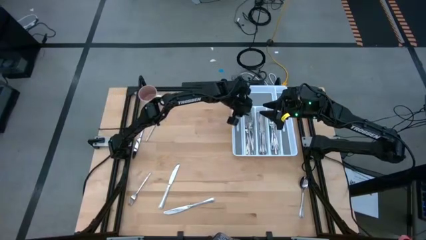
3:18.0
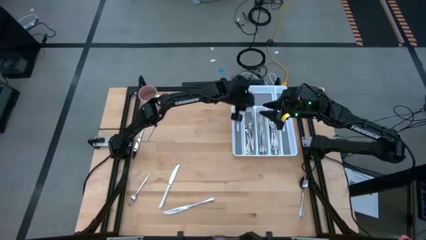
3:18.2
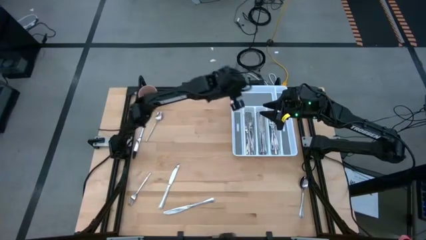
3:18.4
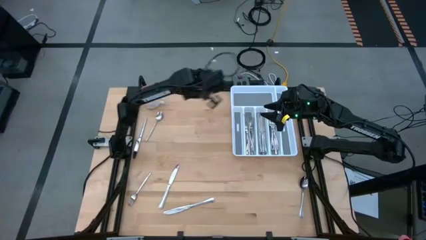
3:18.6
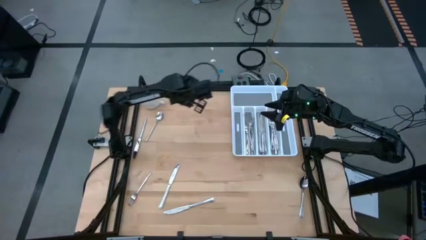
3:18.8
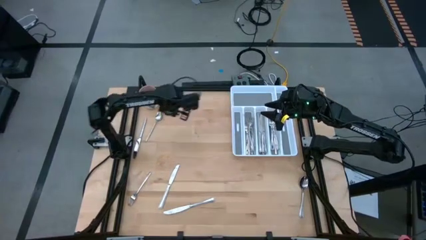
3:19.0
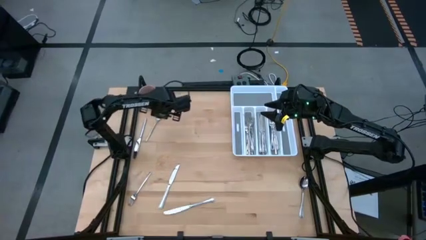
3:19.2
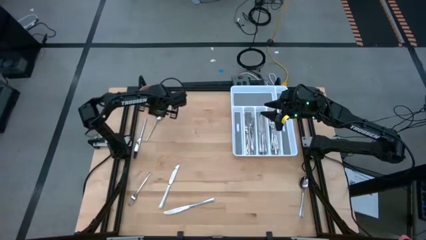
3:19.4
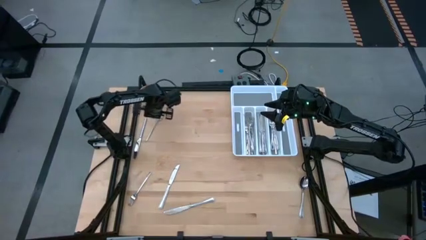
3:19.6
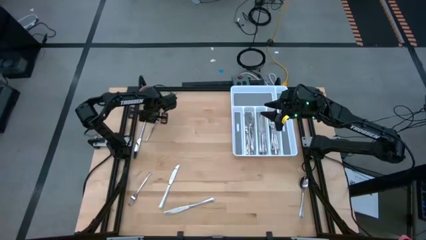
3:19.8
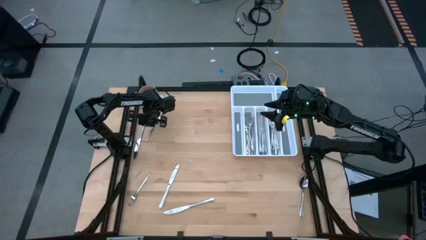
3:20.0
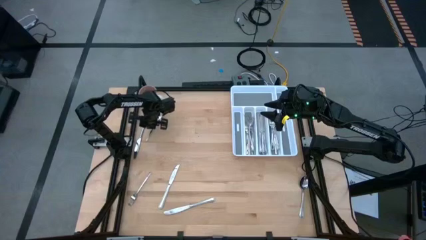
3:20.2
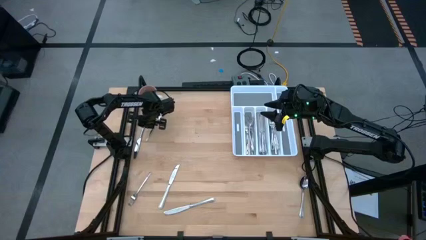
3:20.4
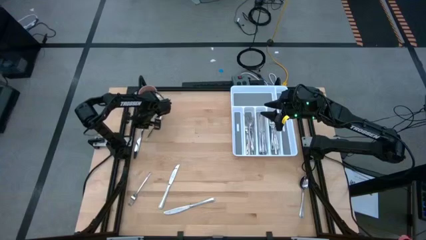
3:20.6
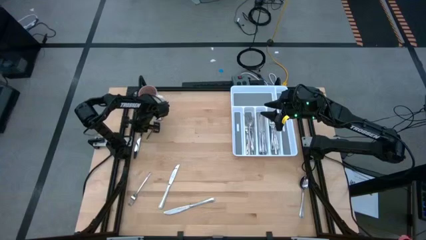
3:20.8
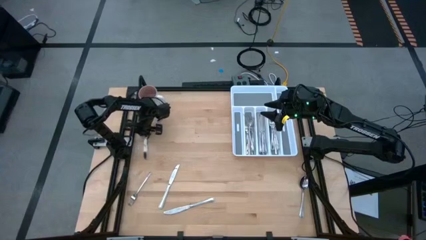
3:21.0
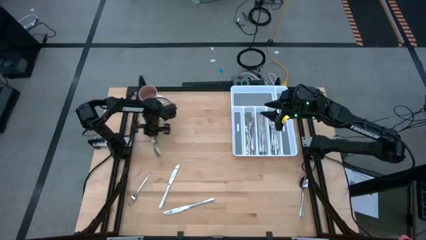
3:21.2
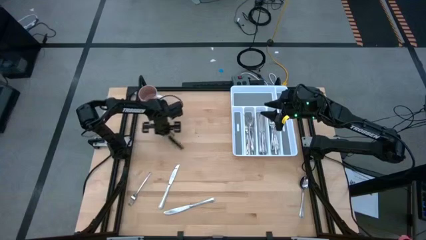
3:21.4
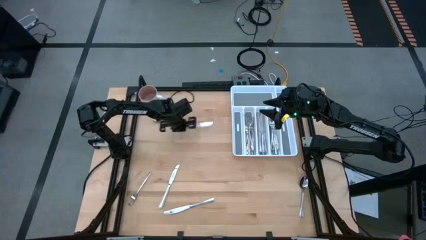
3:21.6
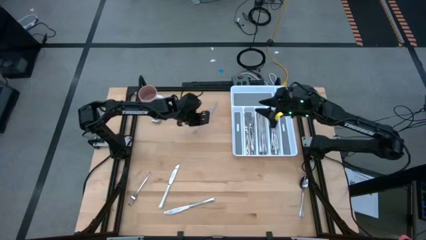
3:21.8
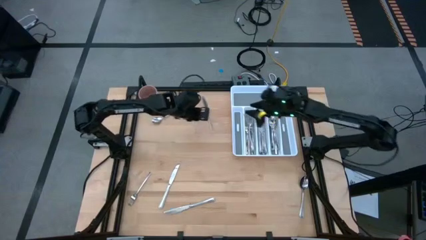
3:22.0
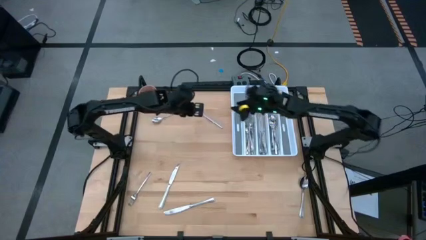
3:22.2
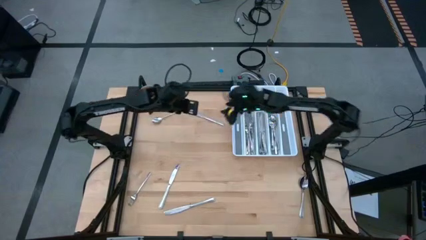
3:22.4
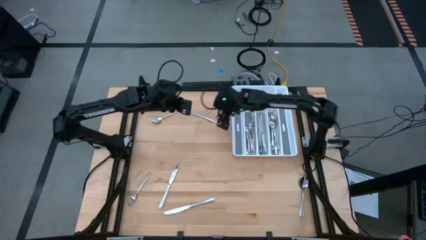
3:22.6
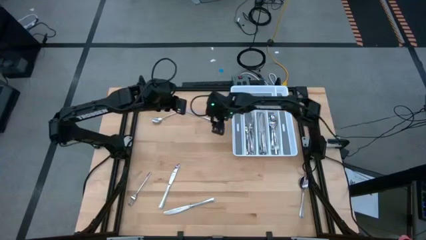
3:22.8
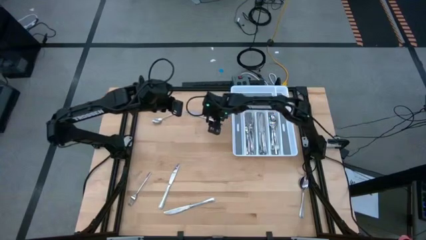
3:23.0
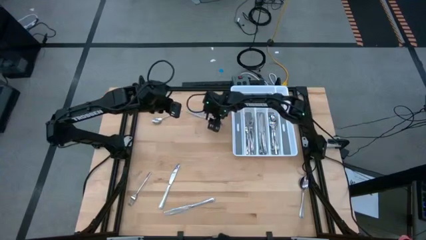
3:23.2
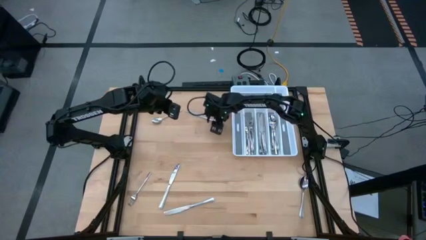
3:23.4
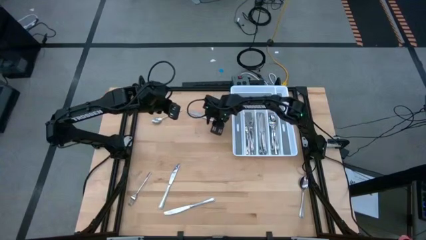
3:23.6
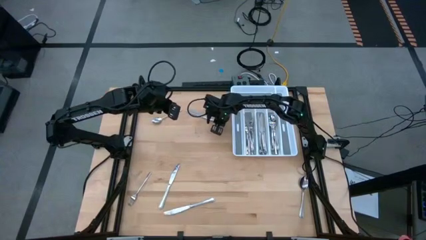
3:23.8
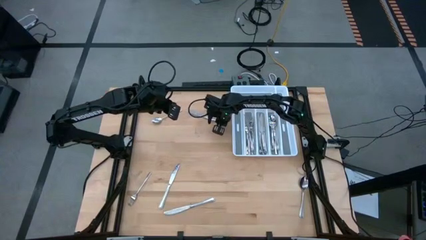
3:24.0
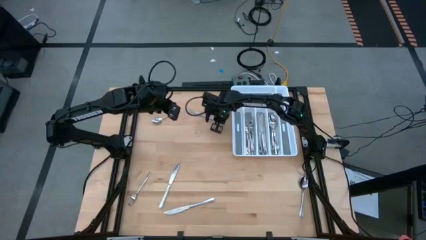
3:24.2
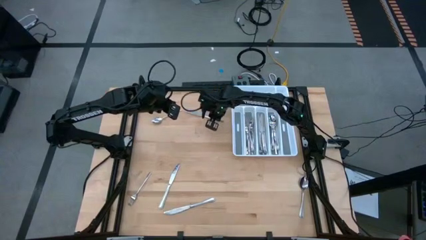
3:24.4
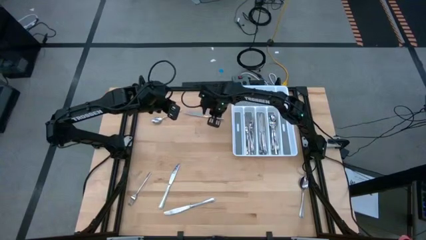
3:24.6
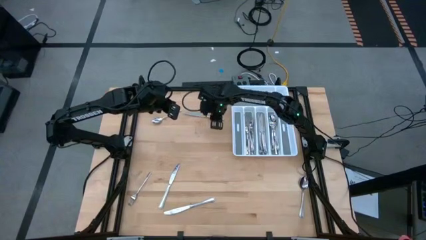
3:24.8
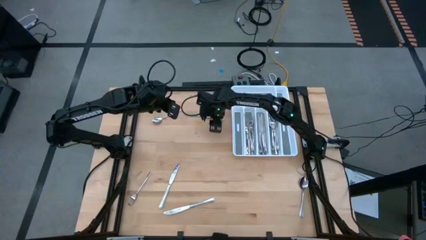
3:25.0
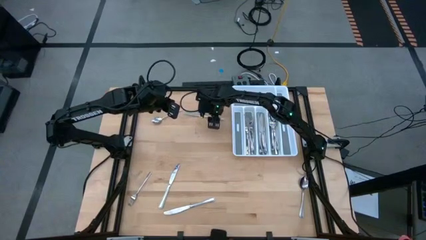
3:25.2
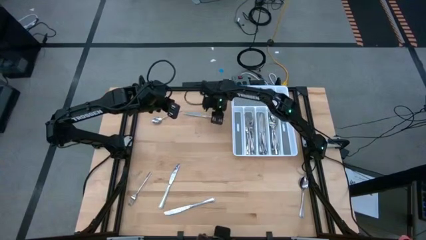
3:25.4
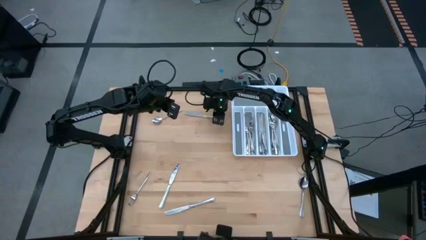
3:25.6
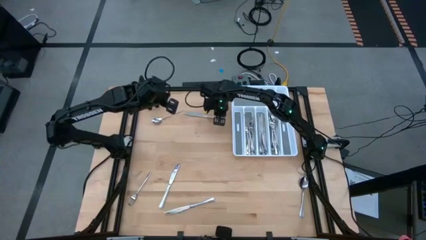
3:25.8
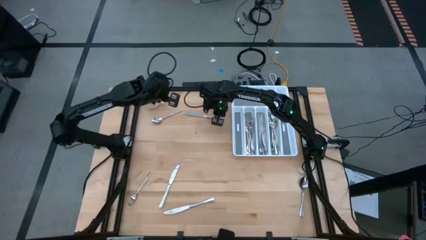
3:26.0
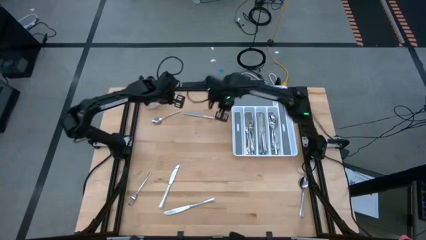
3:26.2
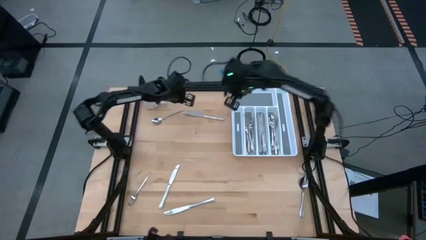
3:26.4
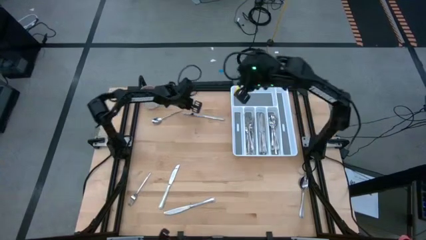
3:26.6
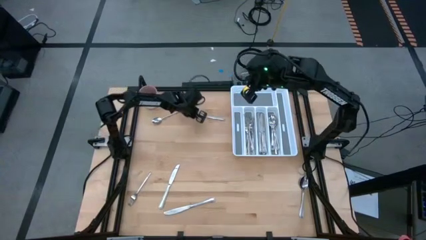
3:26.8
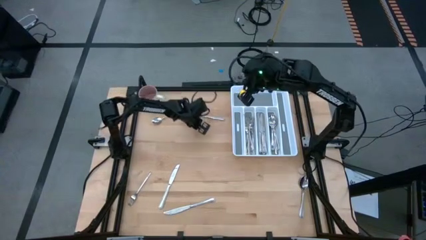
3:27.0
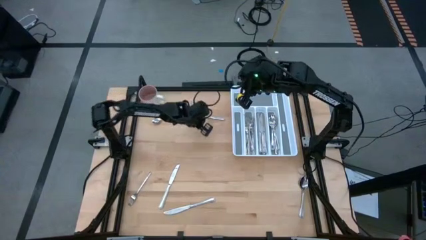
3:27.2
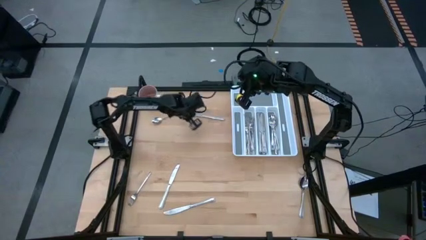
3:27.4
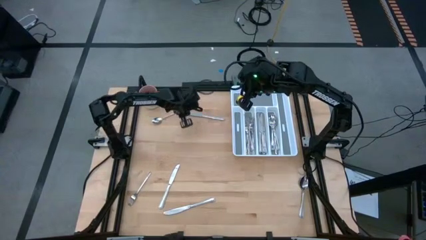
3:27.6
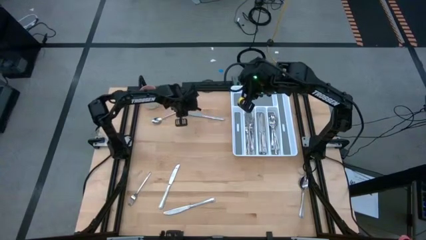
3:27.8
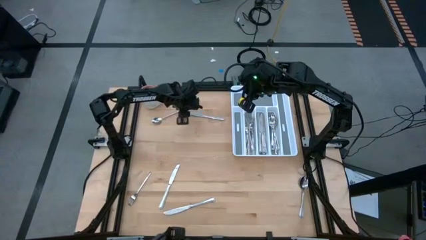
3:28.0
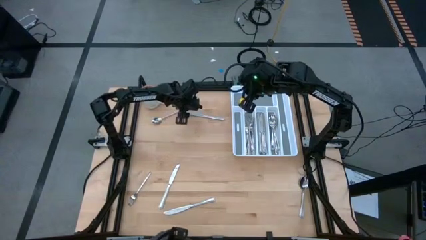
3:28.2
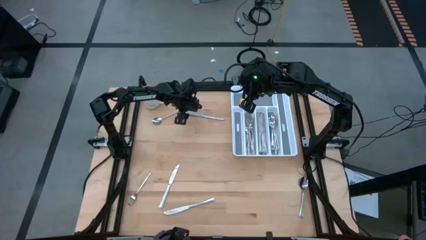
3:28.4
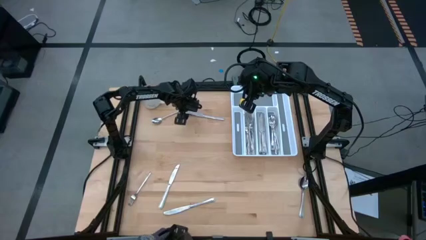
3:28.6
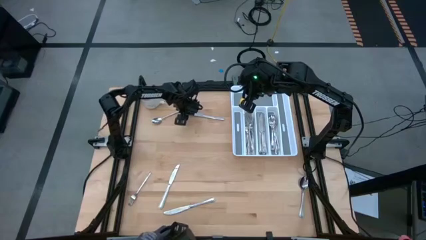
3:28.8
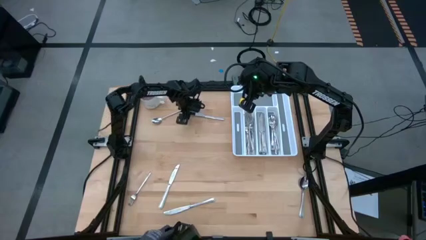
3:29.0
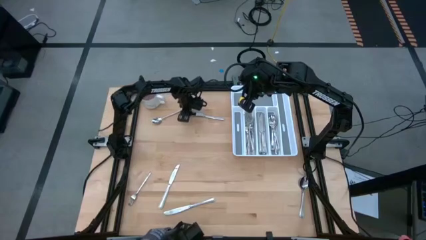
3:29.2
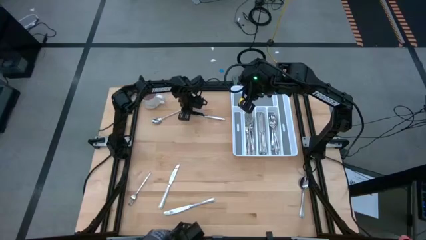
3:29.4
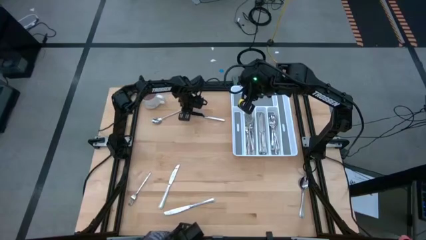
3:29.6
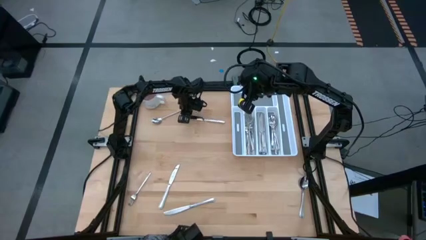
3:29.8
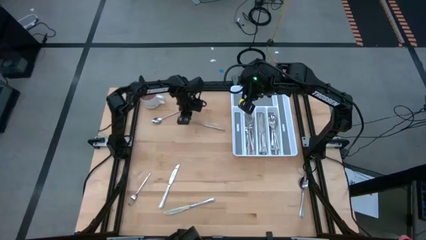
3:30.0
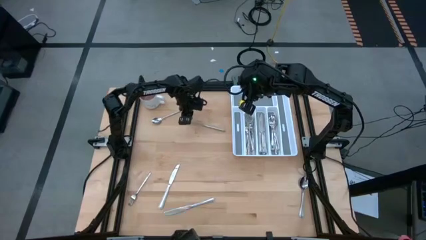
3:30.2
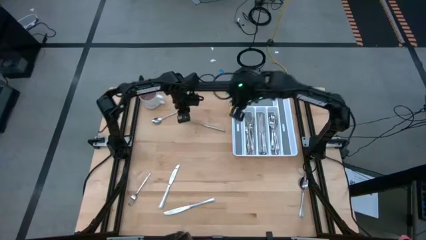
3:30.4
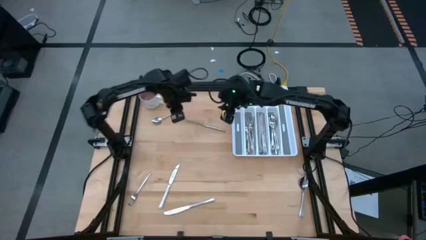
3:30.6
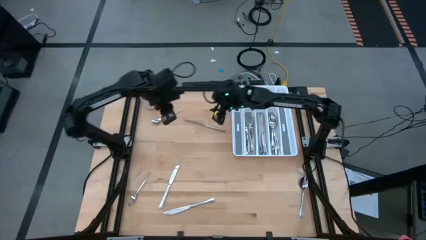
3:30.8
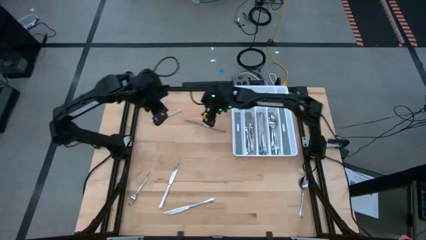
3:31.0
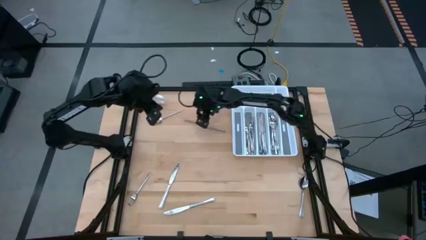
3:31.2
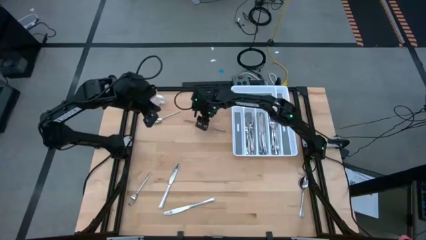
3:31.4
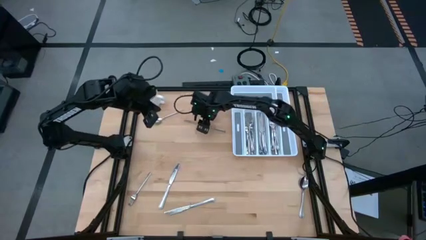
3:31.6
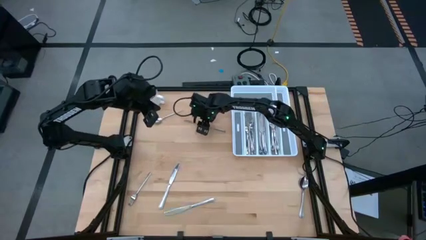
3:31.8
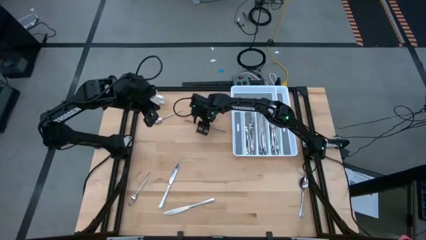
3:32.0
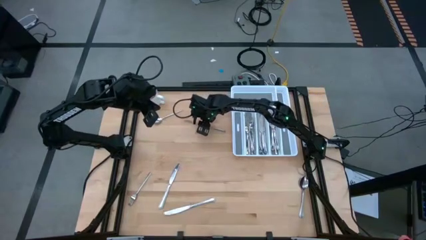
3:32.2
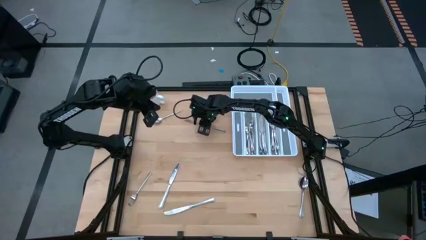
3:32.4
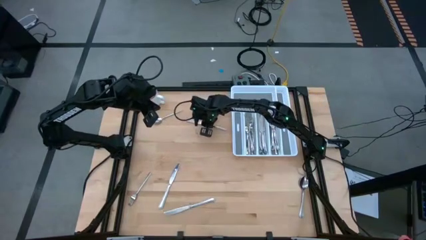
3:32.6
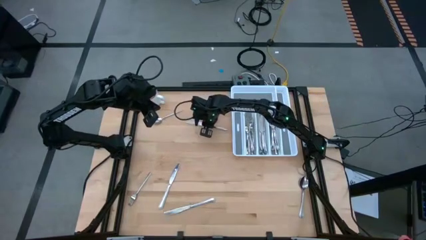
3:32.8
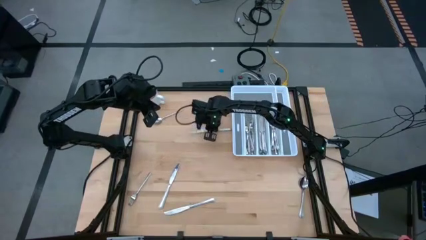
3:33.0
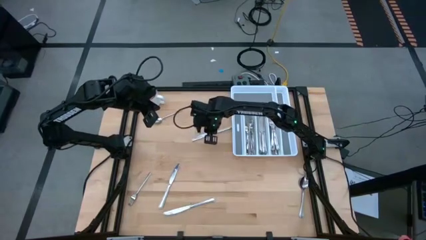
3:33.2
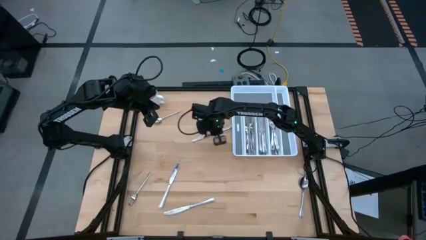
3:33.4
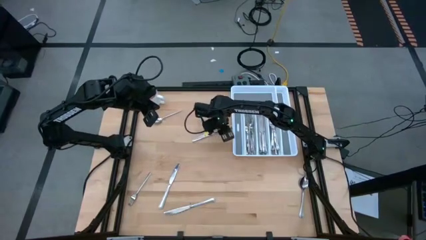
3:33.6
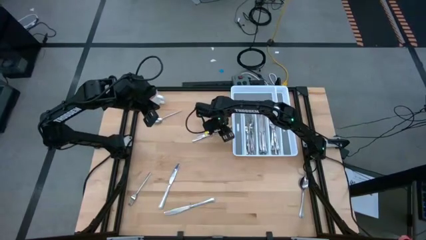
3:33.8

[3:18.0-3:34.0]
Task: Sort silverware
Put the silver table knife into the silverware tray

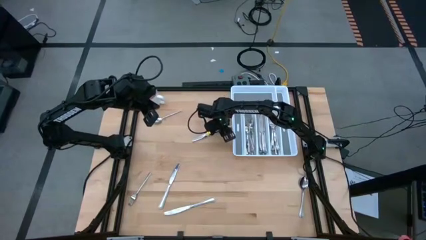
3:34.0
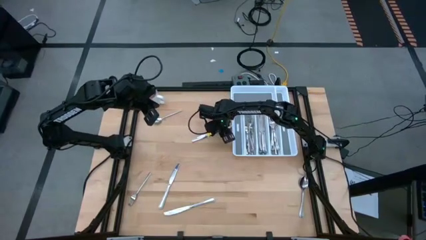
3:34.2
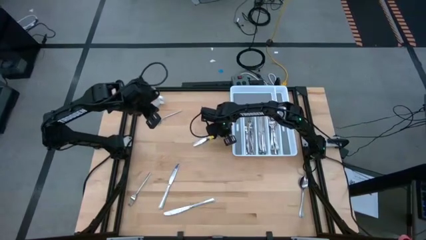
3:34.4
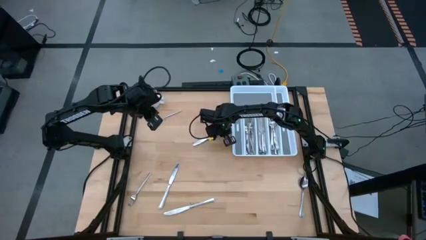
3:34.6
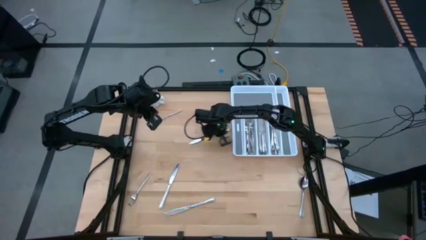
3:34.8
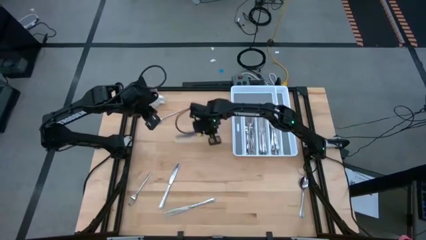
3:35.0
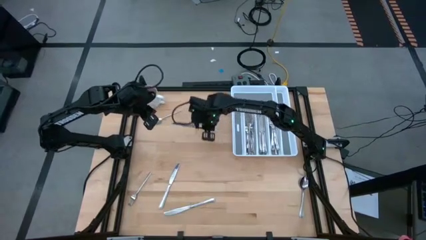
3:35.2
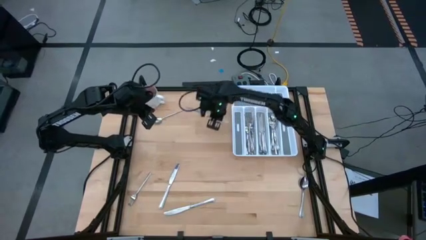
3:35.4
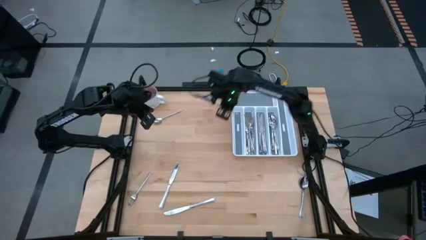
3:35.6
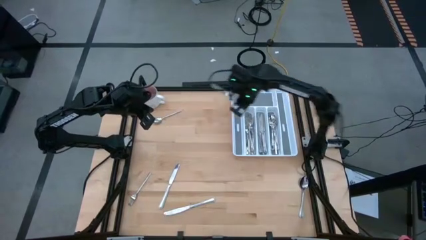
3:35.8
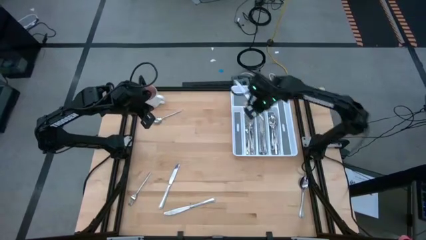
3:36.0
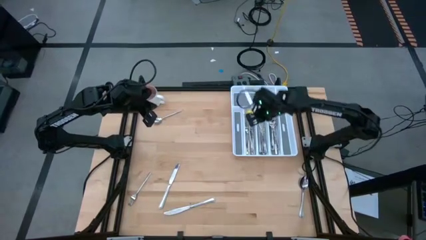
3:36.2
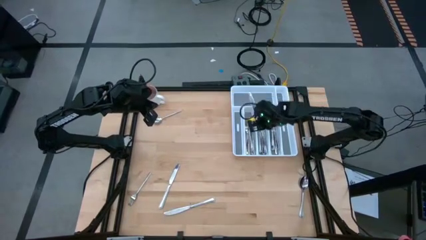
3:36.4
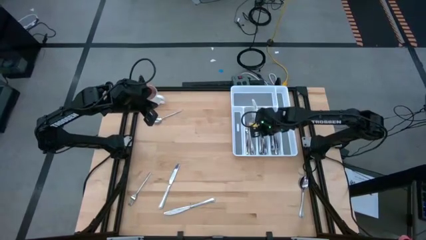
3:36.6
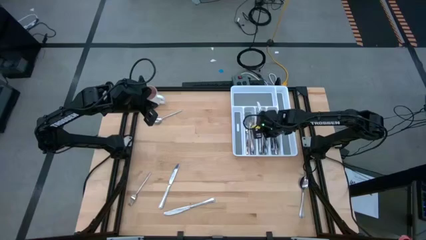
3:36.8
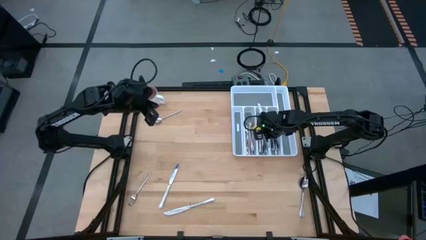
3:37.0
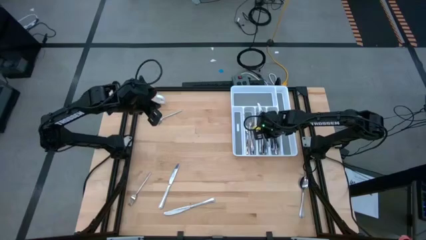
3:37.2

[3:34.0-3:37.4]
Put the silver table knife into the silverware tray
